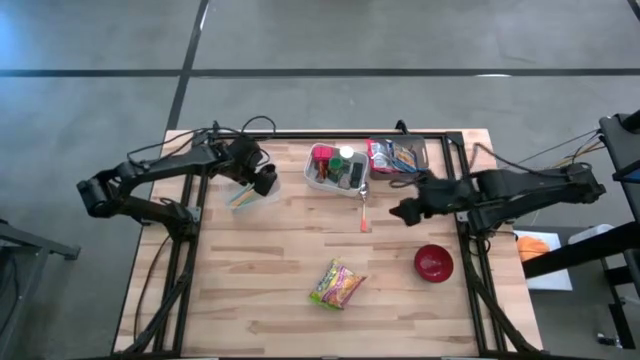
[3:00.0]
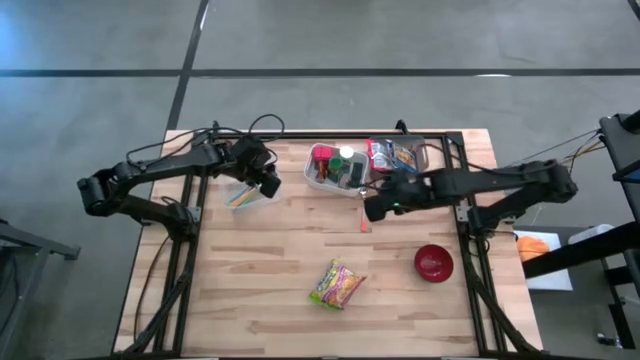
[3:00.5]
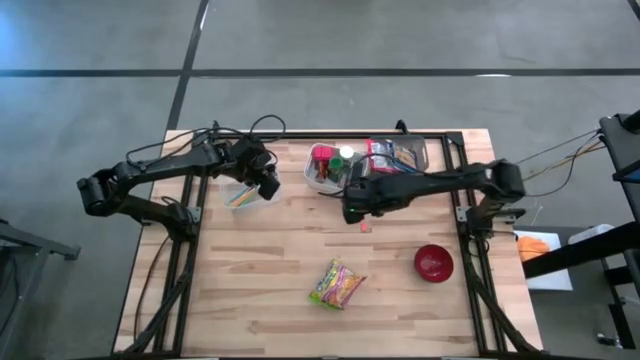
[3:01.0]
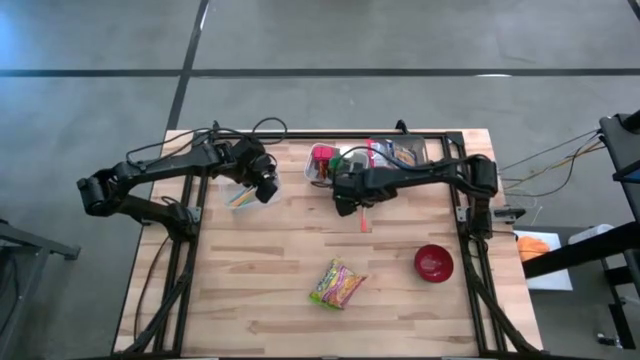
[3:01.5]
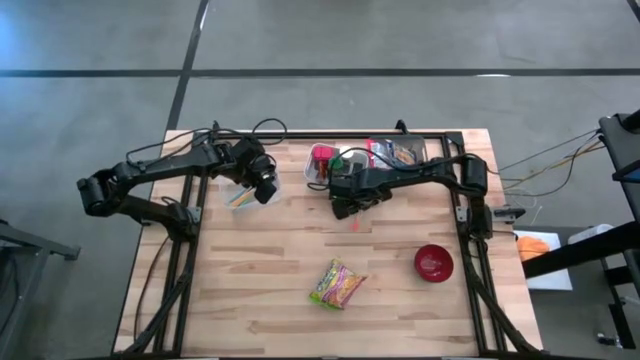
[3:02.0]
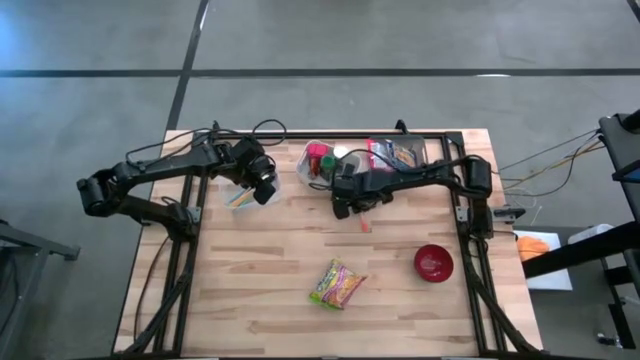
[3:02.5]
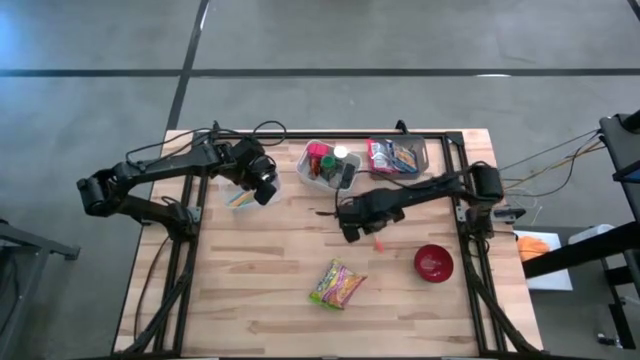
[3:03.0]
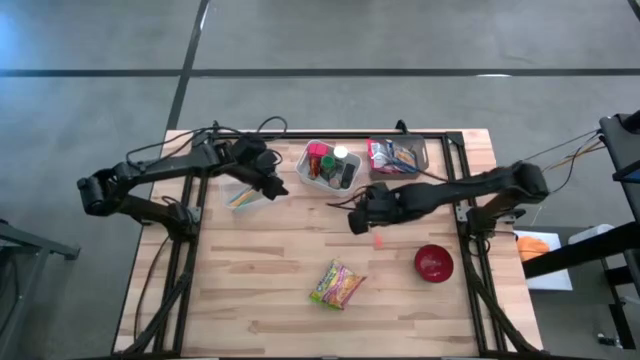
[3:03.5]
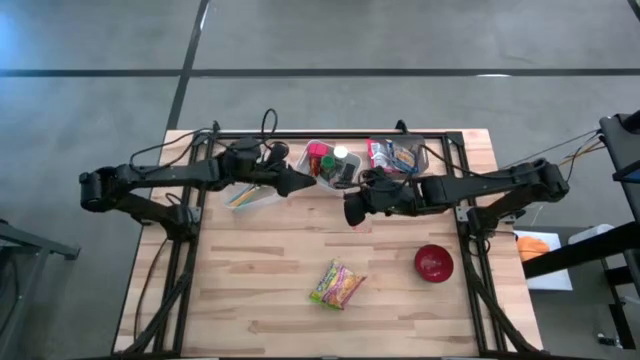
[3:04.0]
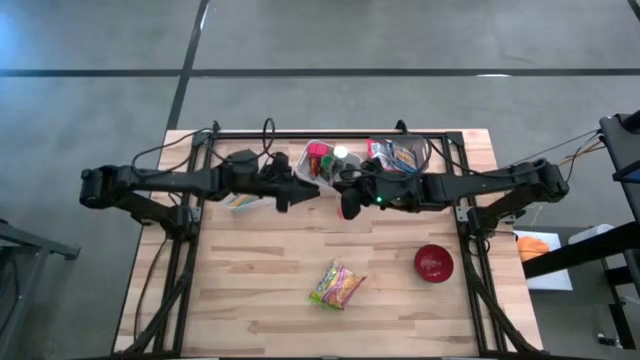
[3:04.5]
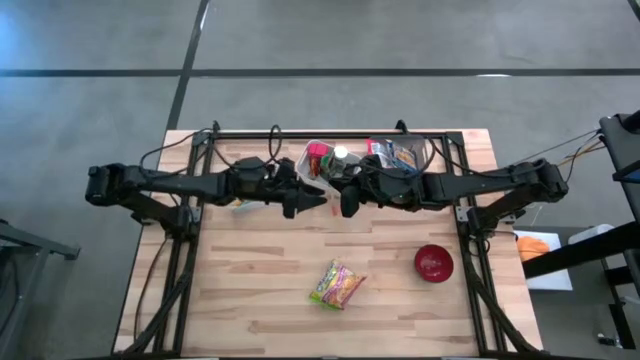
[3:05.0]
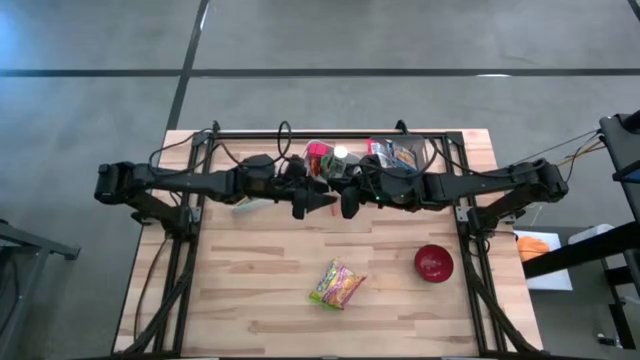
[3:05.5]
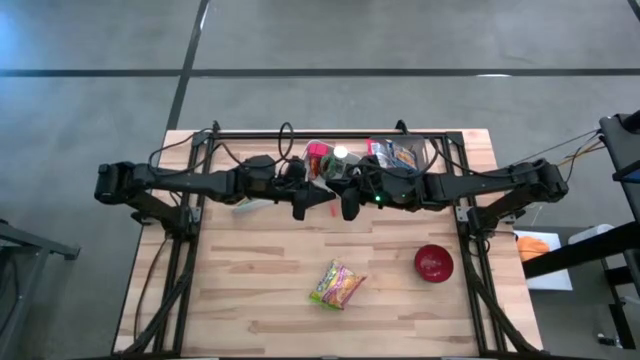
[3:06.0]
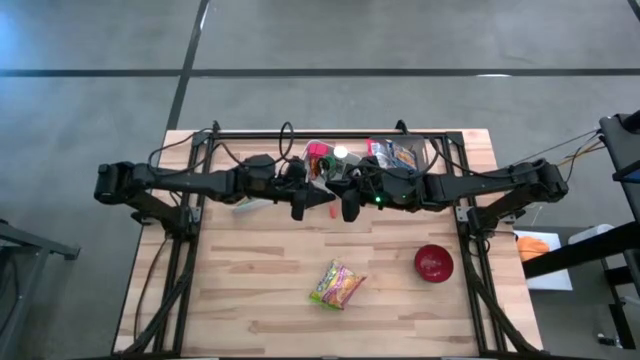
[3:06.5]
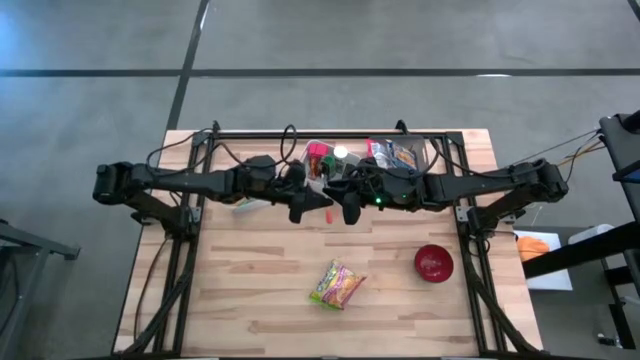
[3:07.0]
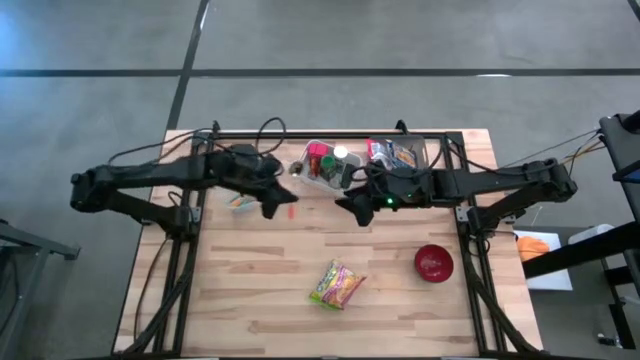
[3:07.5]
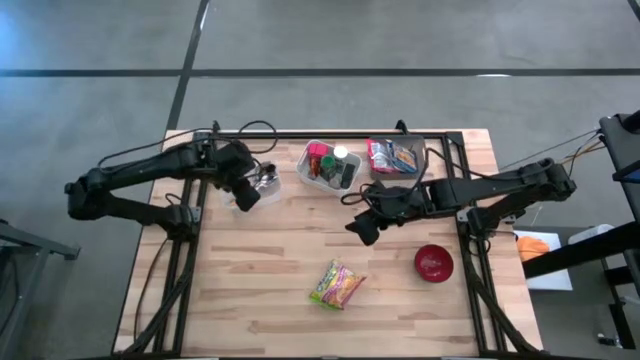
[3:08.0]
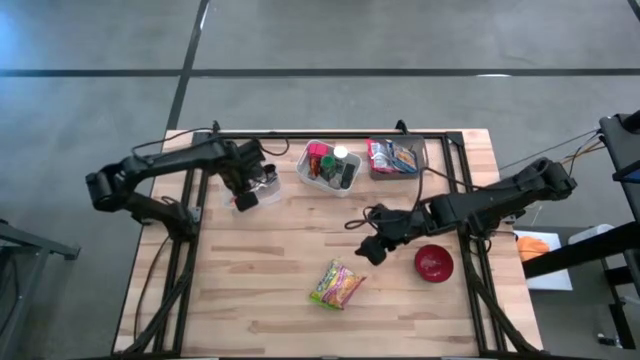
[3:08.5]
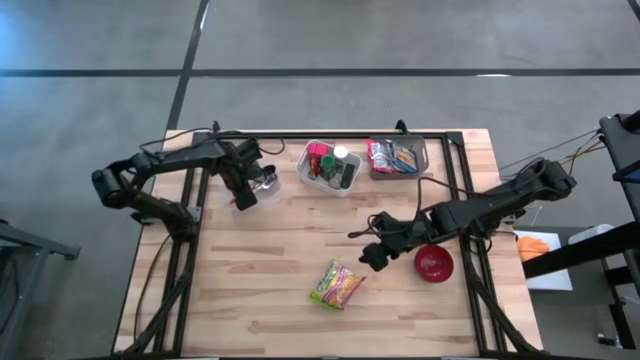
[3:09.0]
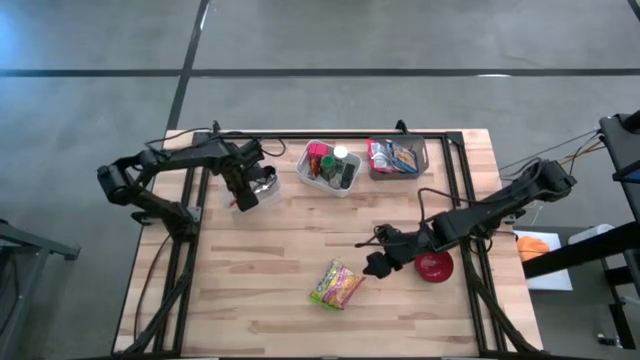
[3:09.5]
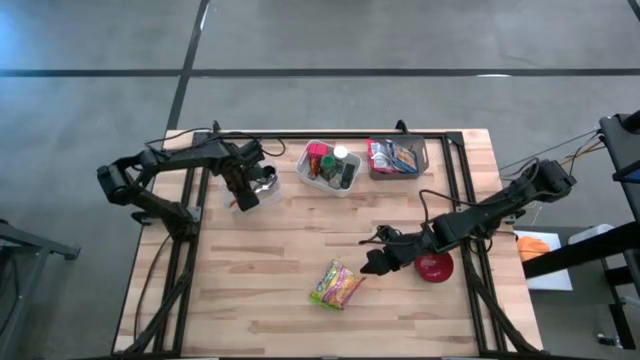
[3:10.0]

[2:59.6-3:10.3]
Put the orange spoon into the transparent bin

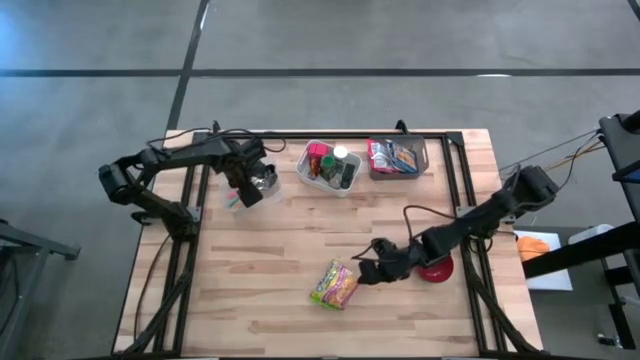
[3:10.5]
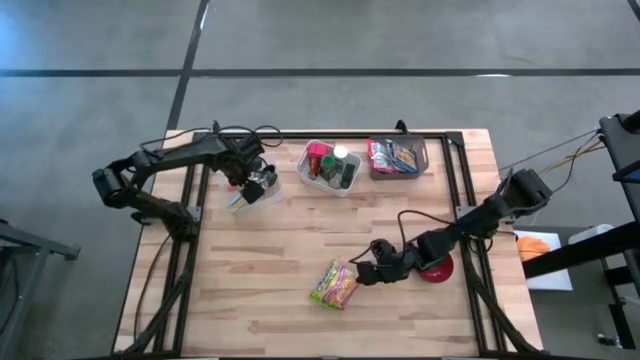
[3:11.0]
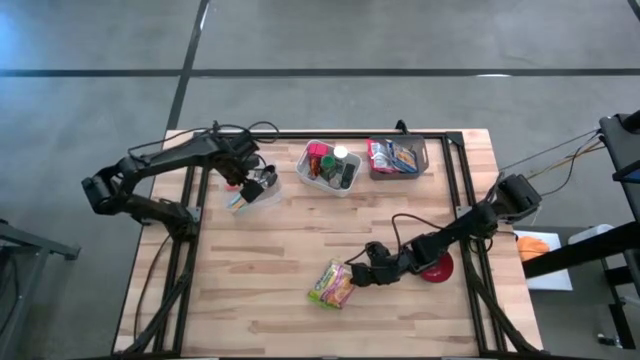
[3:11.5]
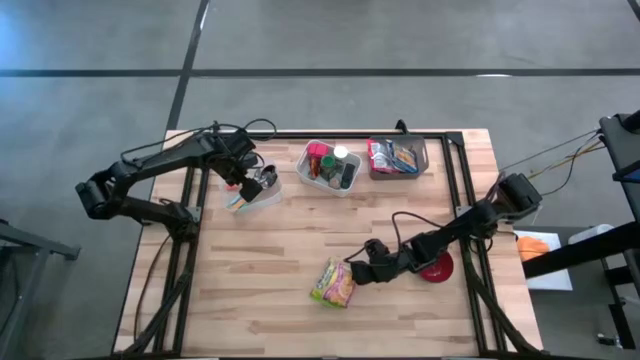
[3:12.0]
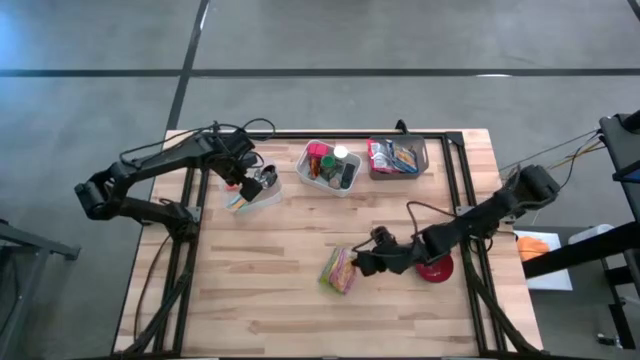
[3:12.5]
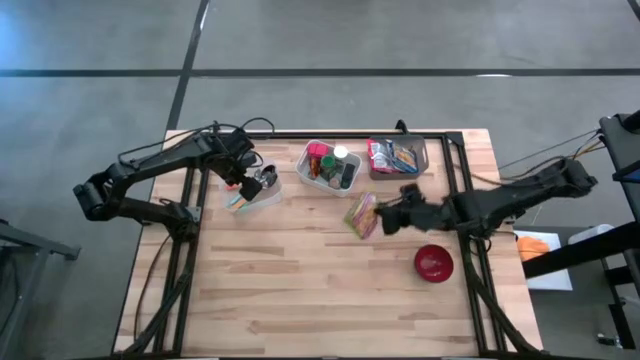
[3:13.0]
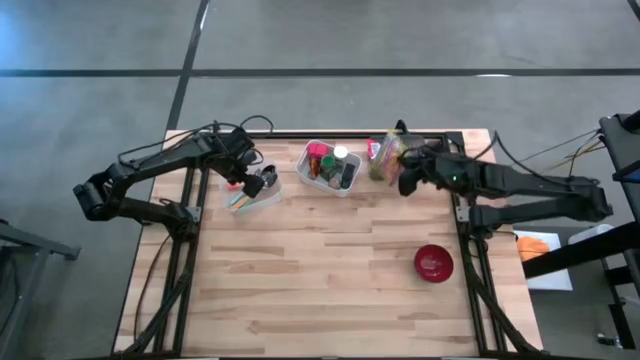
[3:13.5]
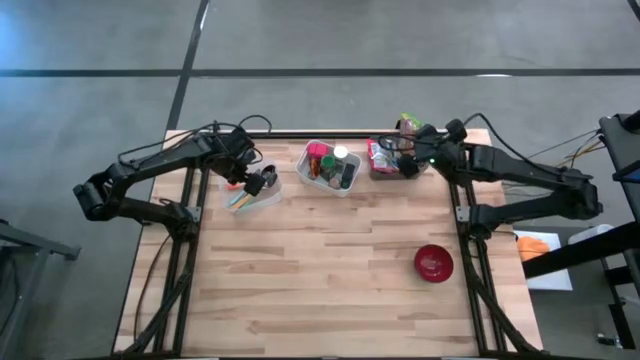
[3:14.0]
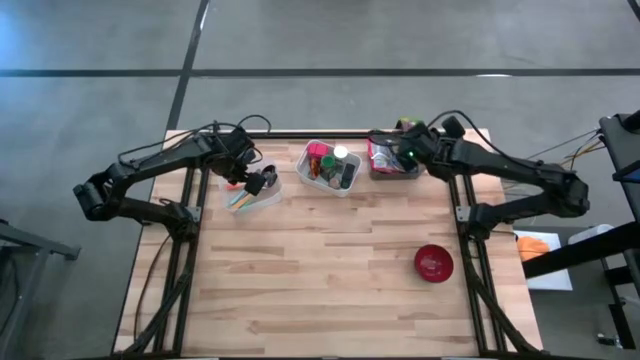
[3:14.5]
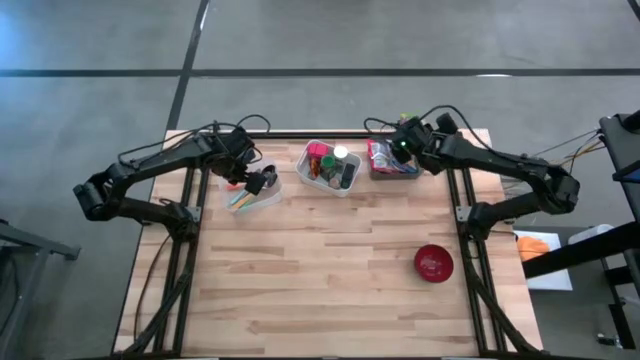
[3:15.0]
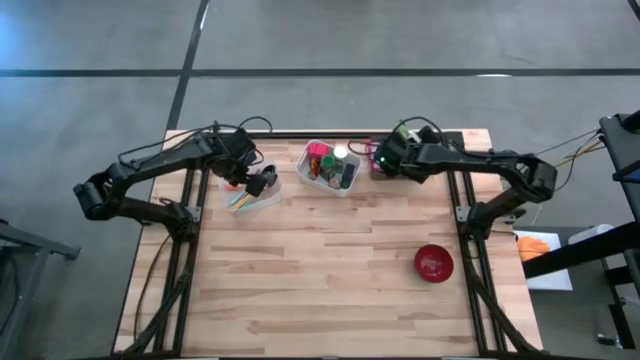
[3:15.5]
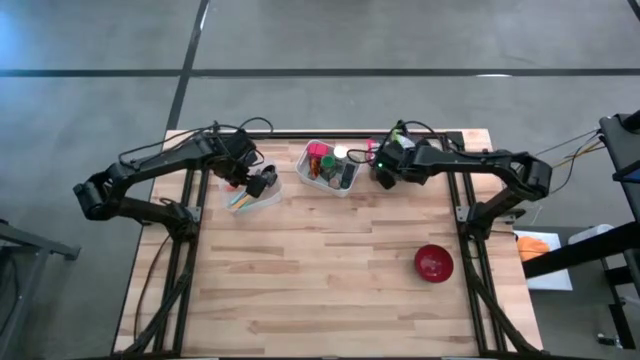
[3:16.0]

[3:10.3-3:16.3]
Put the green noodle pack into the black bin

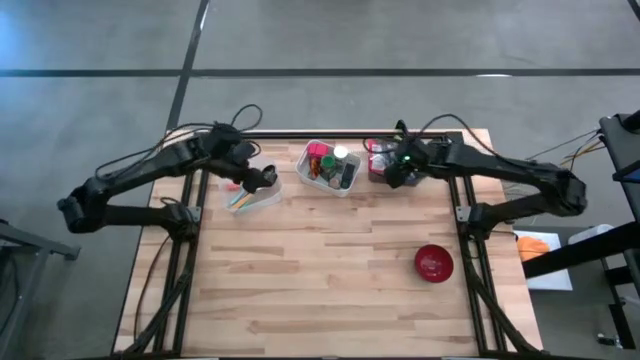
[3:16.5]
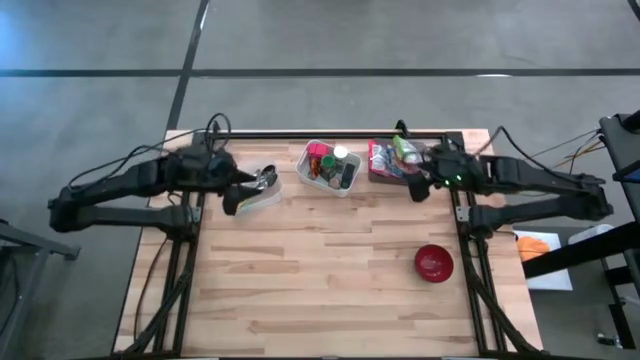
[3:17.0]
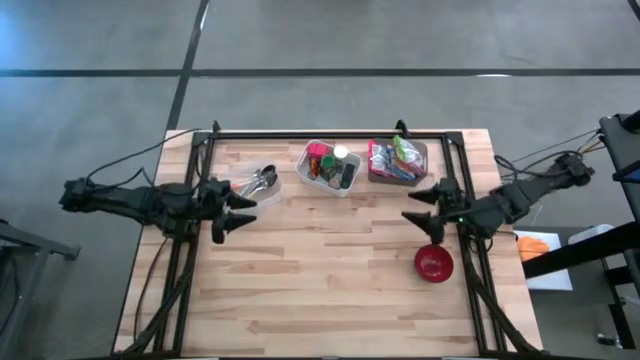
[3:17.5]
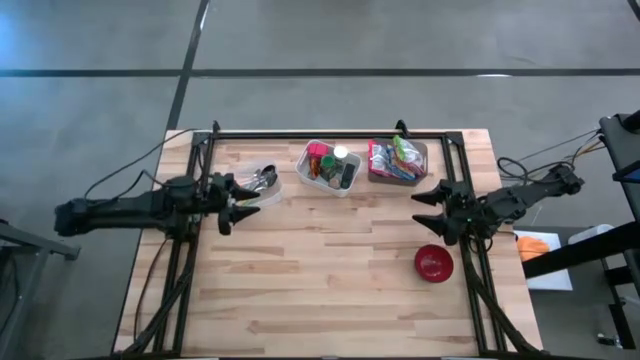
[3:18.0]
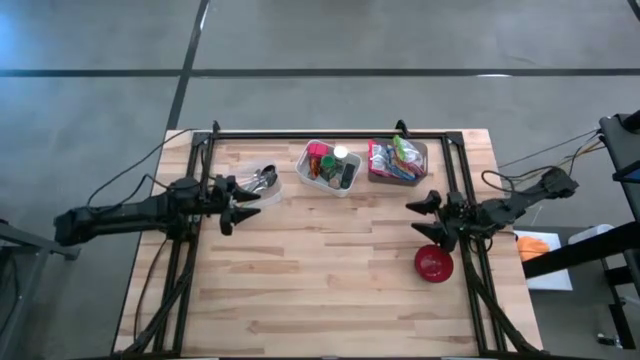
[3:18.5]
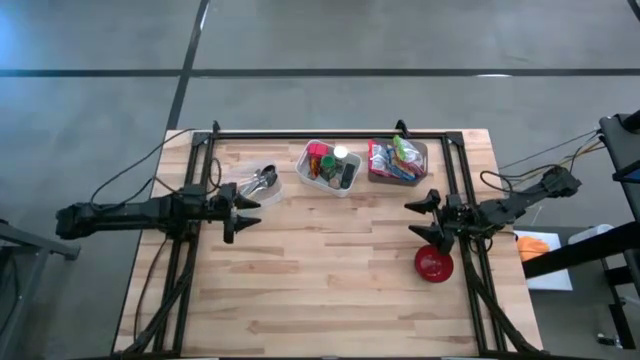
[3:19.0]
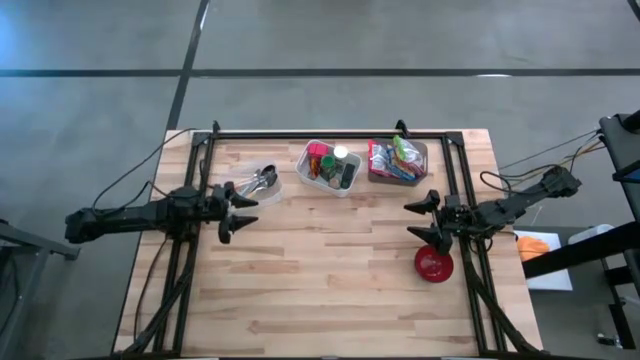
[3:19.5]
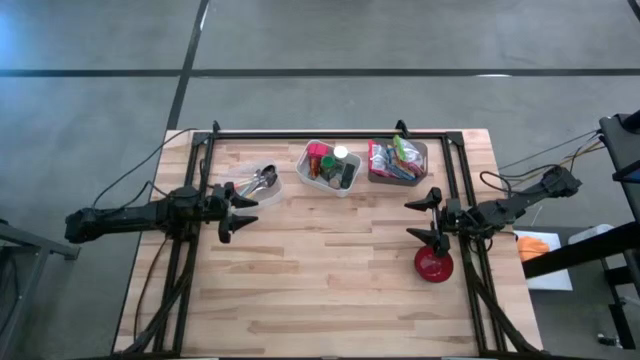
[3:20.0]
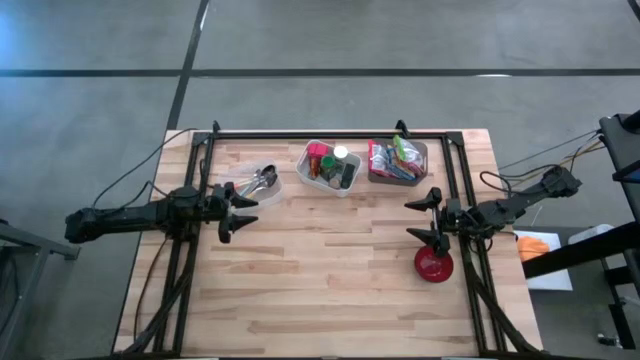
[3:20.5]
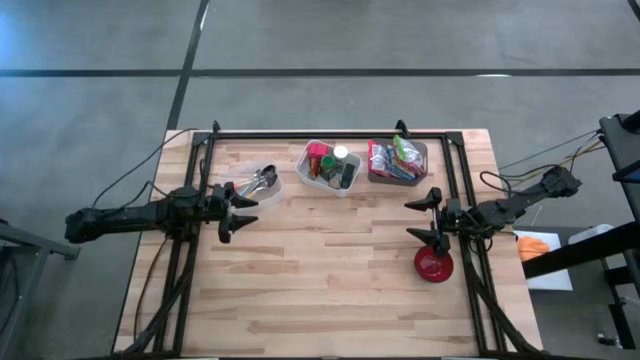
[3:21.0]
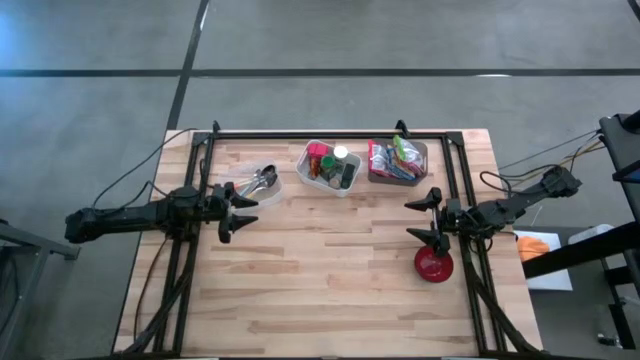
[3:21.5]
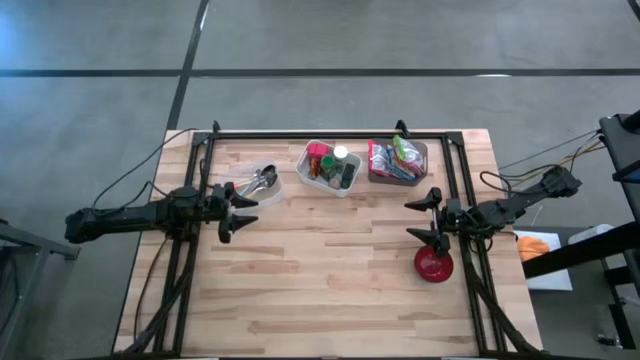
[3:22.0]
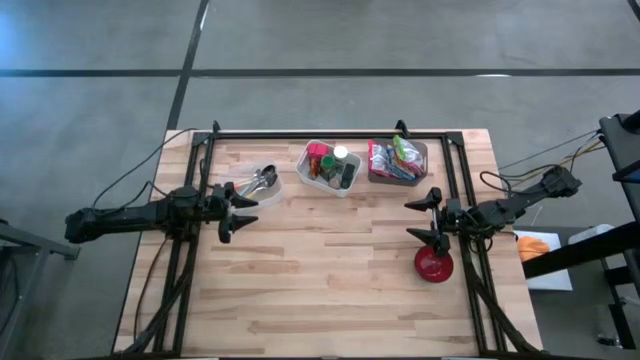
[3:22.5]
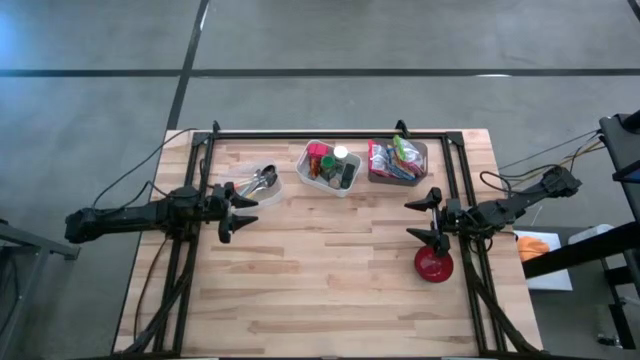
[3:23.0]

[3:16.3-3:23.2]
Return to Home Position
